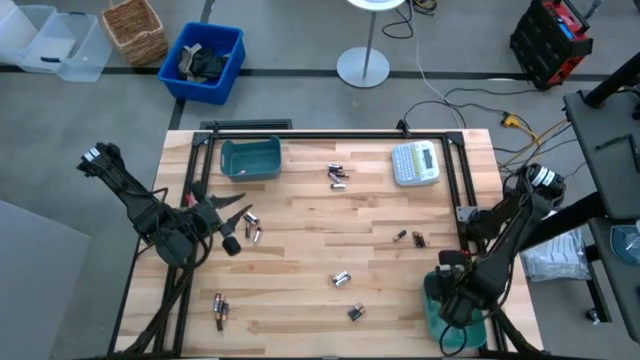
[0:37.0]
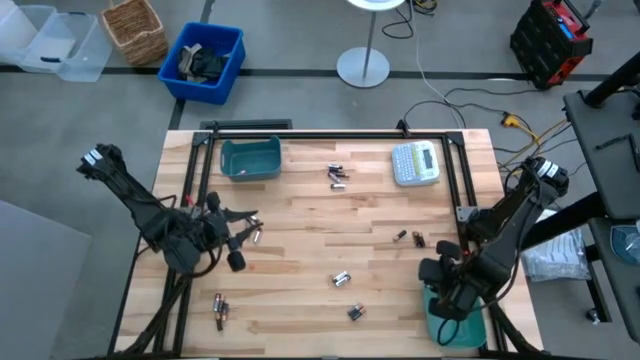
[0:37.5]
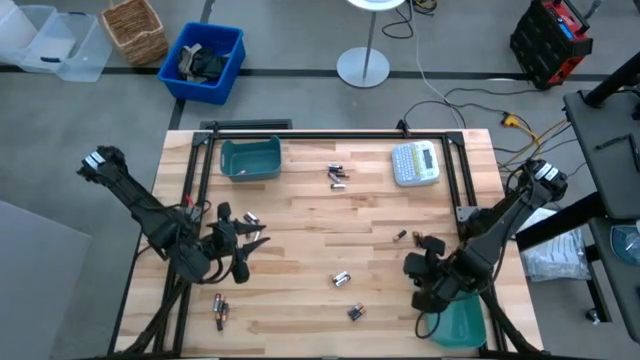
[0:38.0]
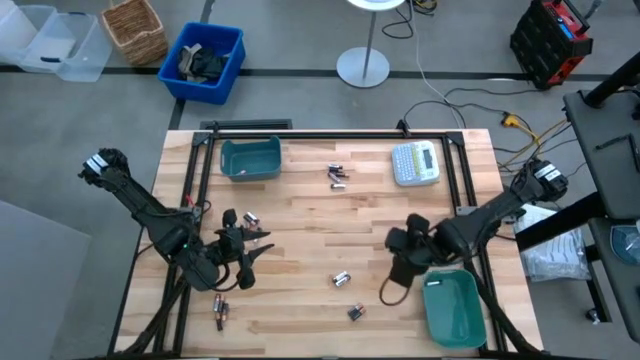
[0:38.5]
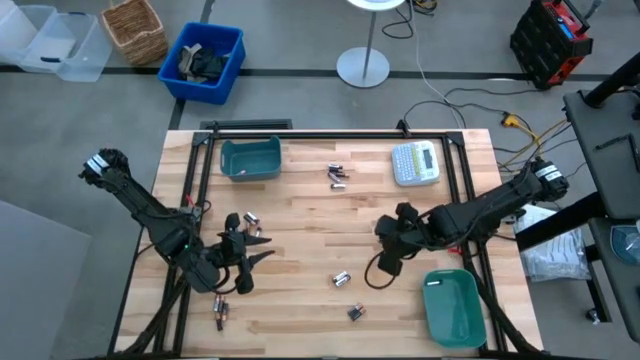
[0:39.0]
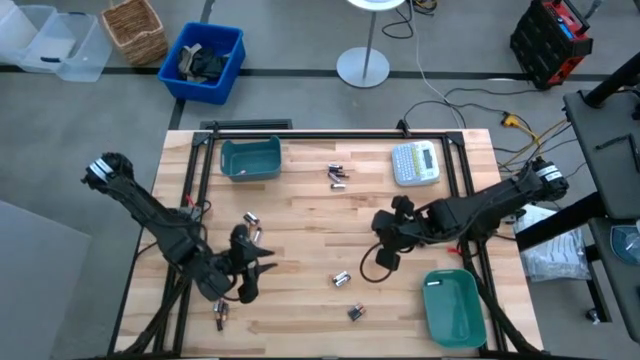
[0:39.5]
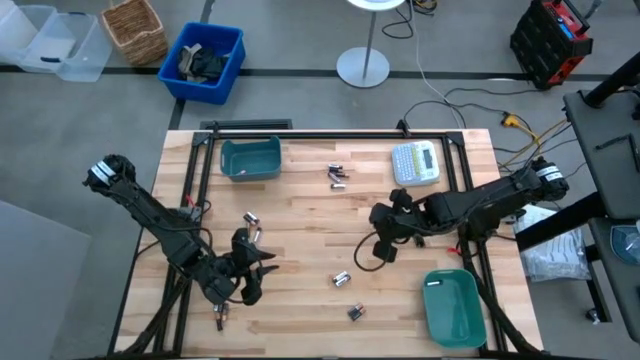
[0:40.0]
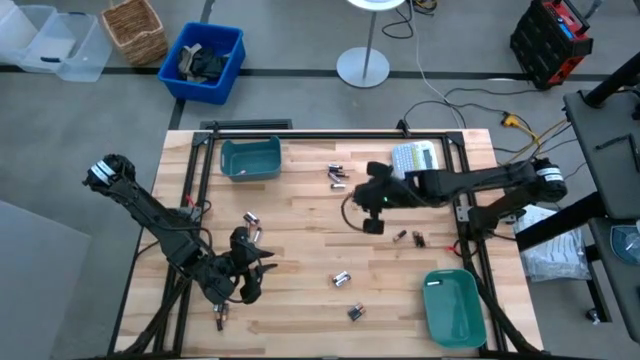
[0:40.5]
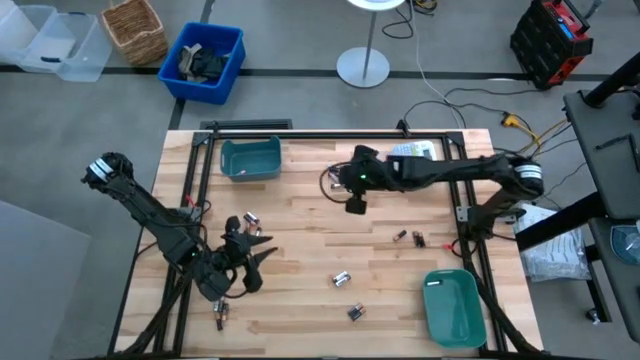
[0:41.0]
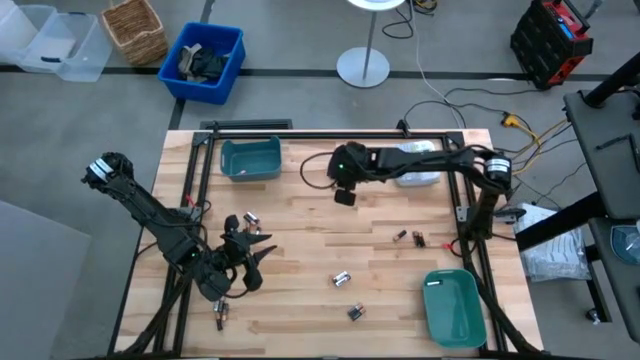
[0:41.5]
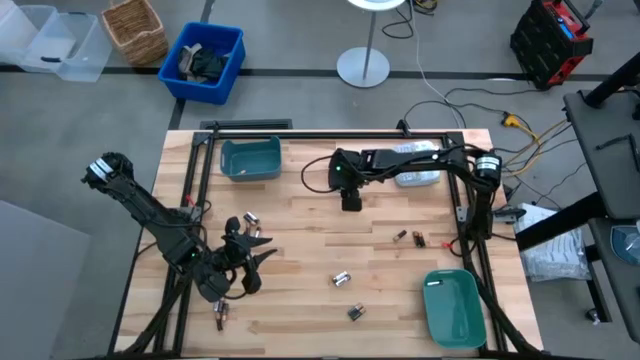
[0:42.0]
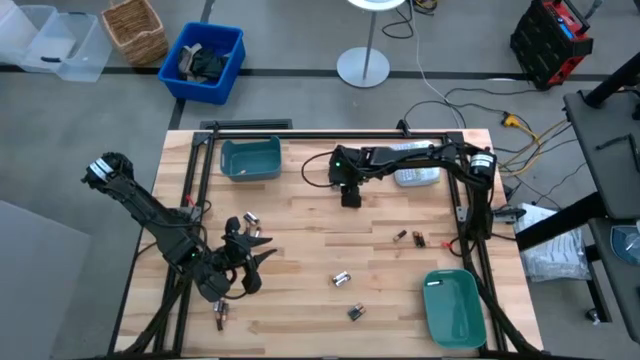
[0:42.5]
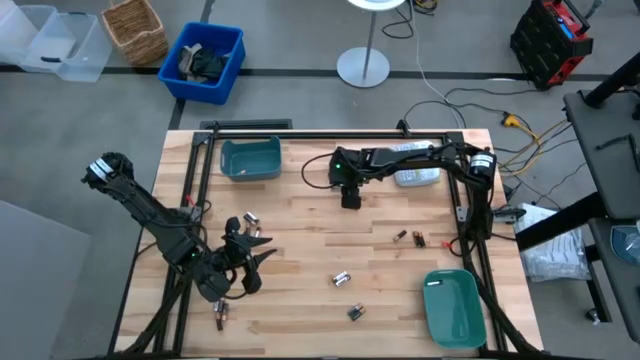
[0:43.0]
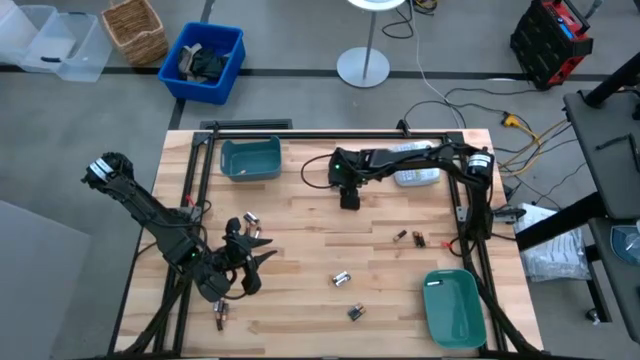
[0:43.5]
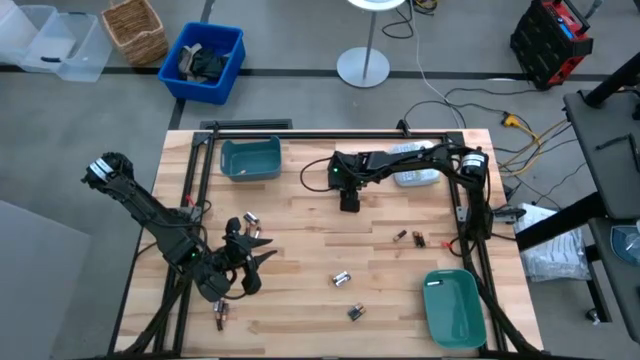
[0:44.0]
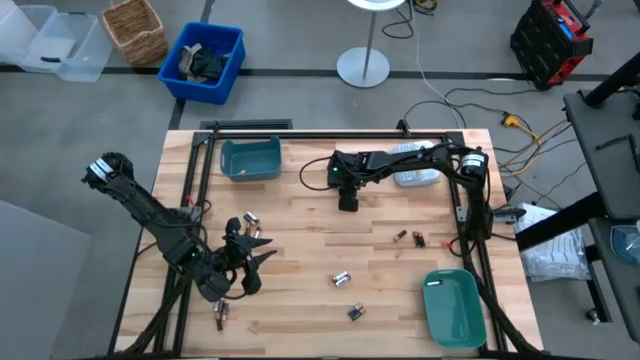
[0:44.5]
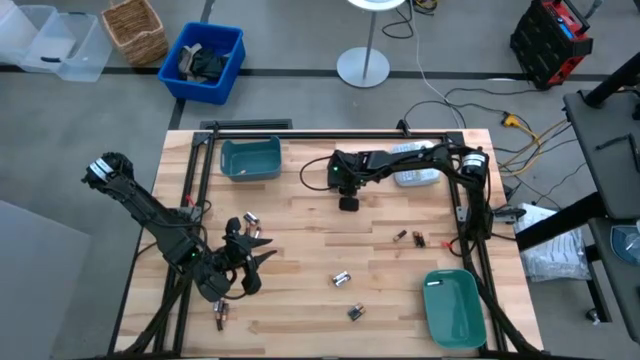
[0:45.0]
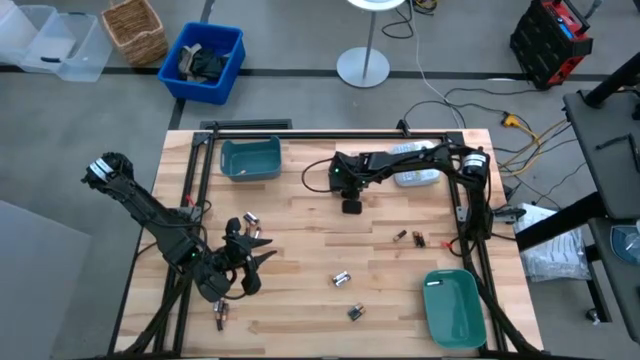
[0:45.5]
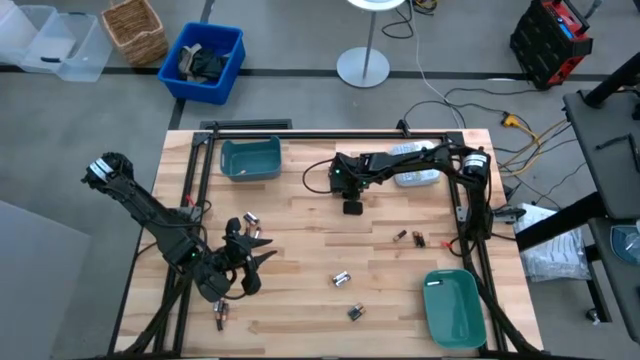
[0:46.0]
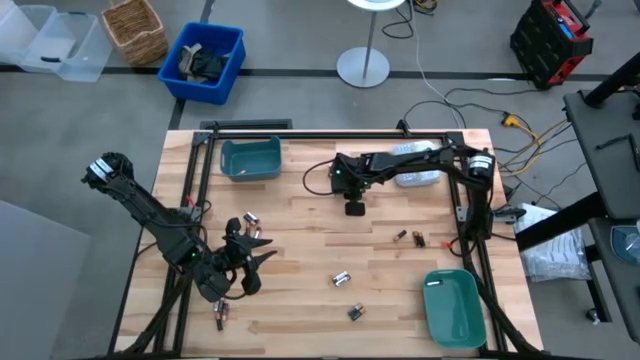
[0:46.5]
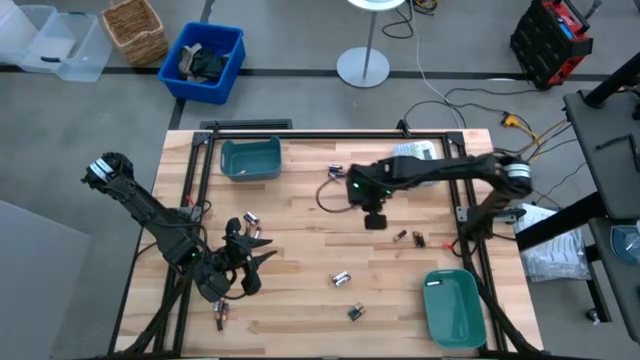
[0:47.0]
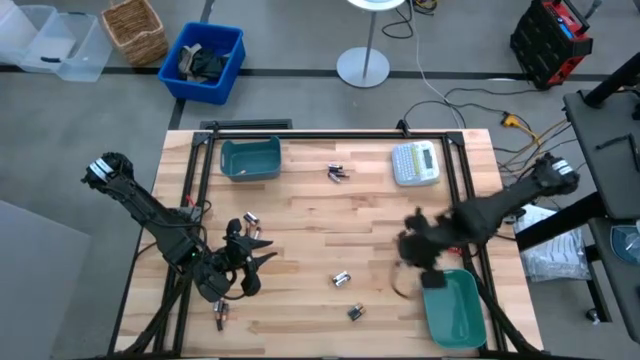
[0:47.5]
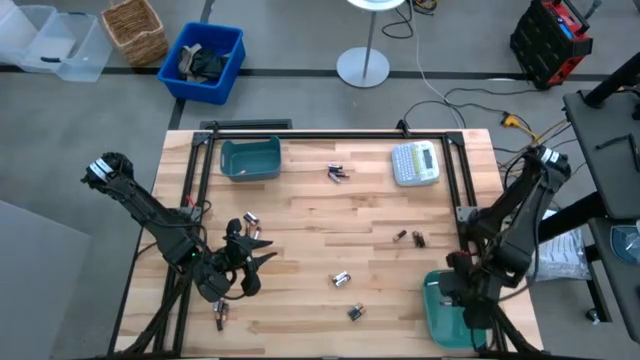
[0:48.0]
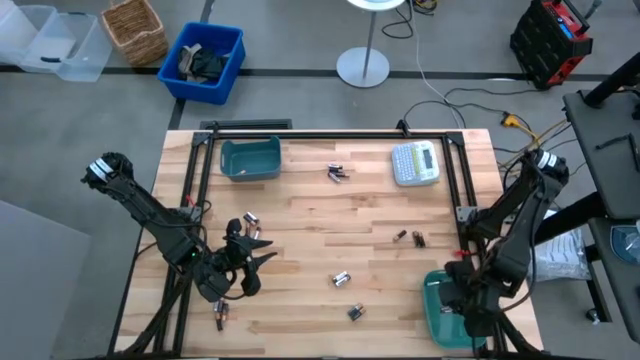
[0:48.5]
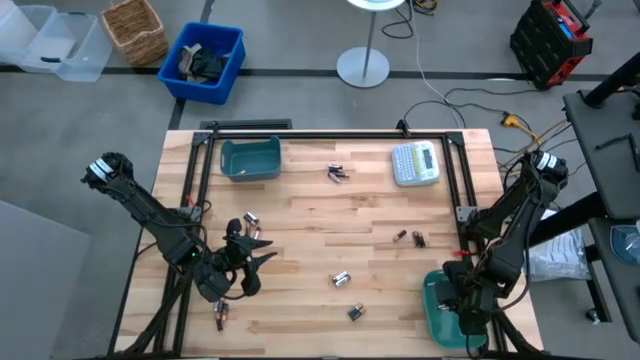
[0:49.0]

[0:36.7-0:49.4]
Task: Sort batteries
Put the silver battery into the green bin

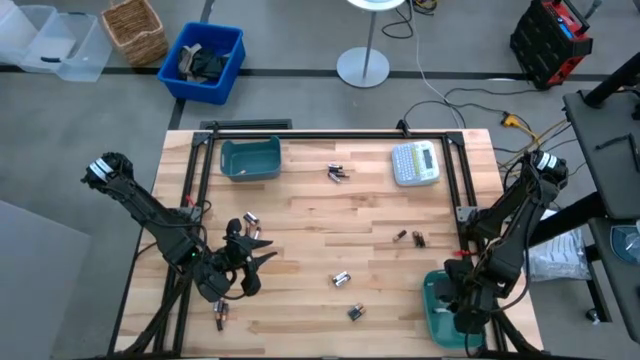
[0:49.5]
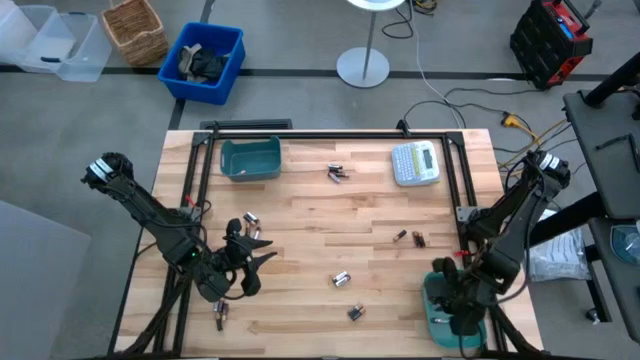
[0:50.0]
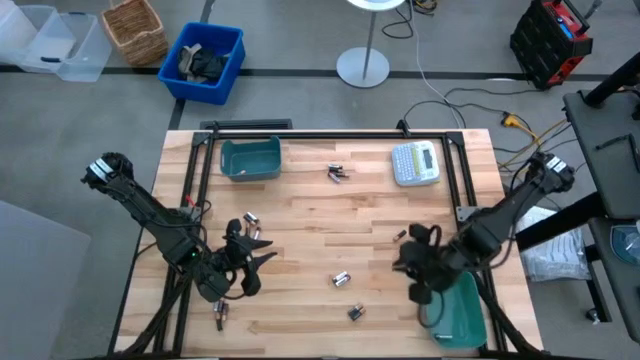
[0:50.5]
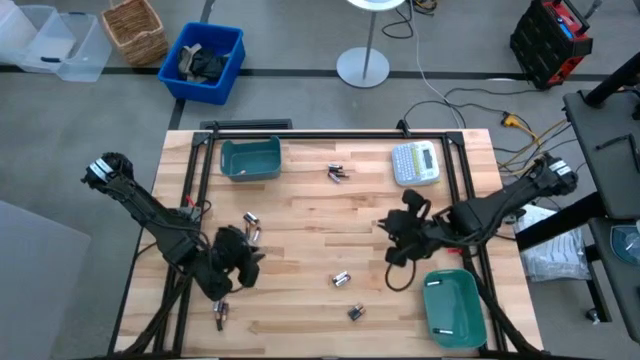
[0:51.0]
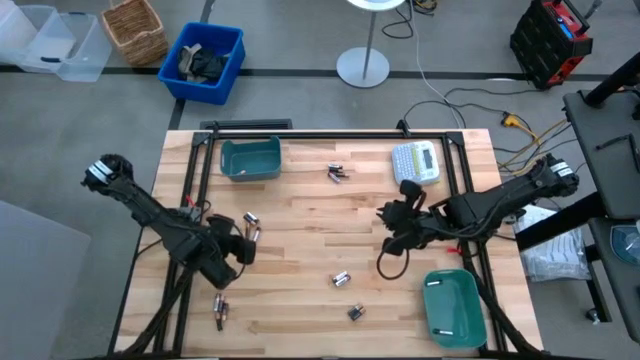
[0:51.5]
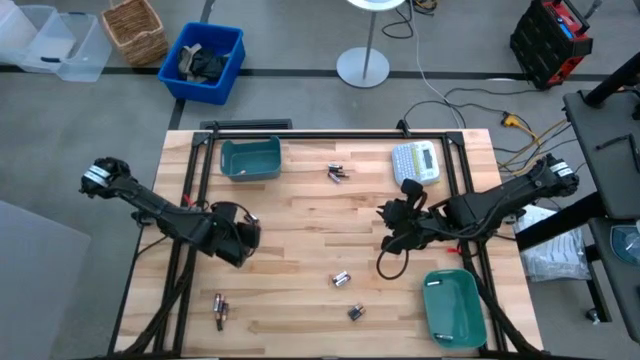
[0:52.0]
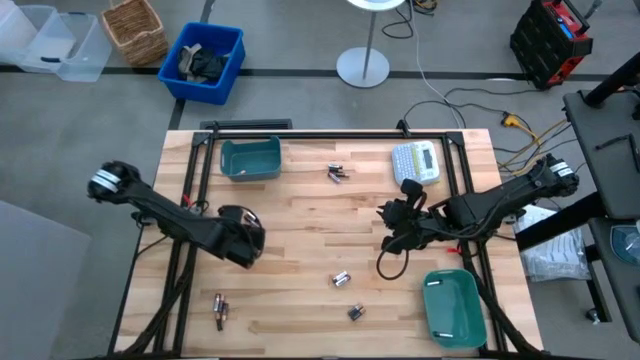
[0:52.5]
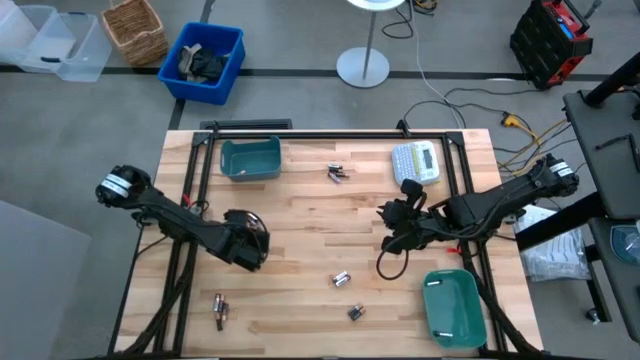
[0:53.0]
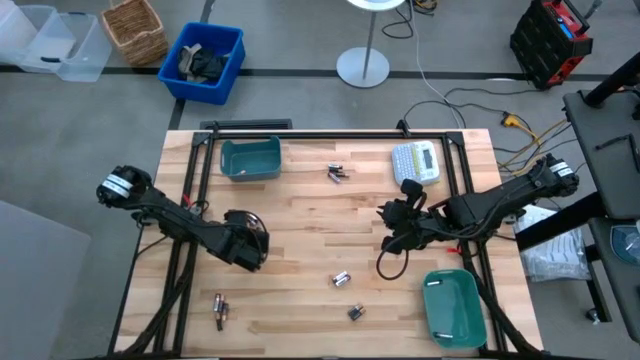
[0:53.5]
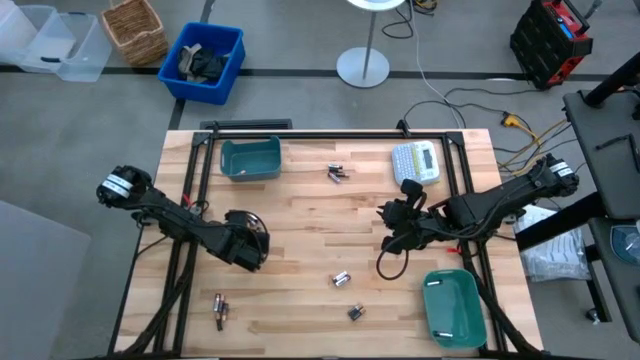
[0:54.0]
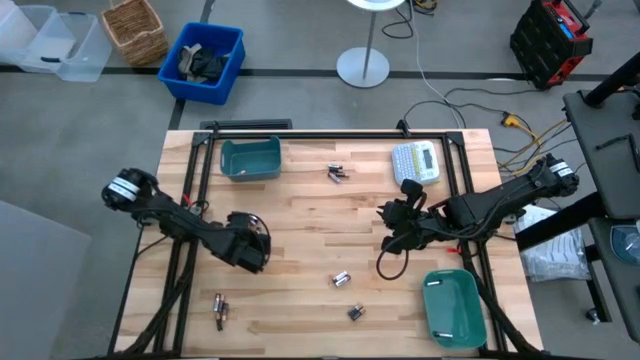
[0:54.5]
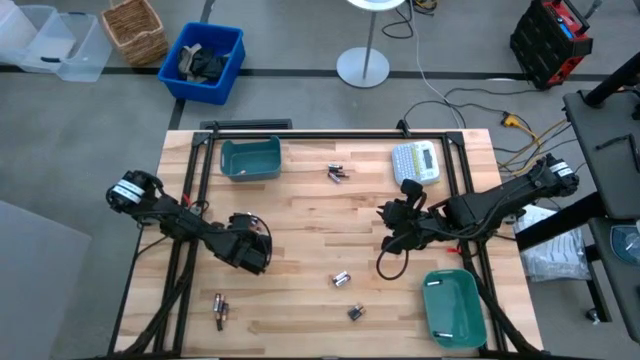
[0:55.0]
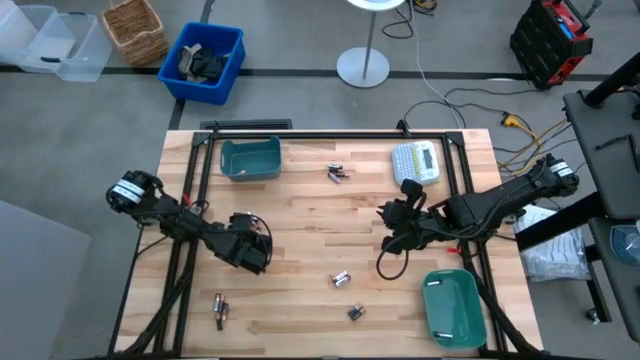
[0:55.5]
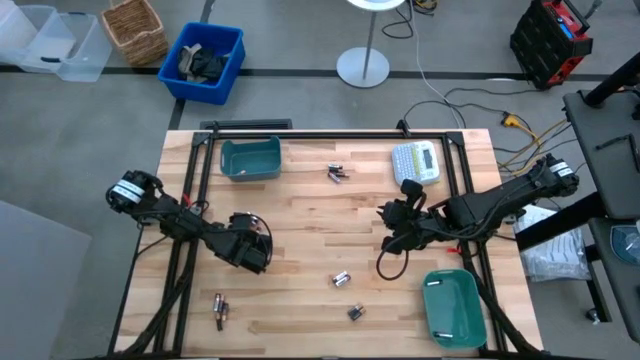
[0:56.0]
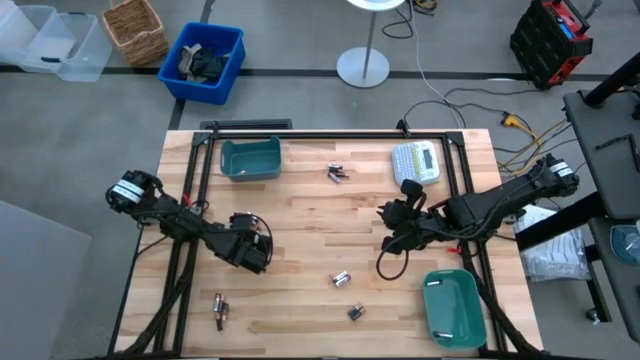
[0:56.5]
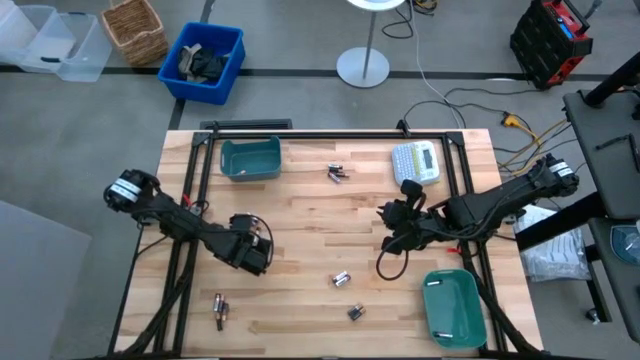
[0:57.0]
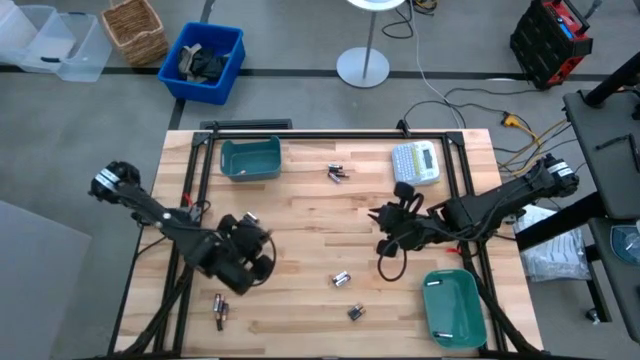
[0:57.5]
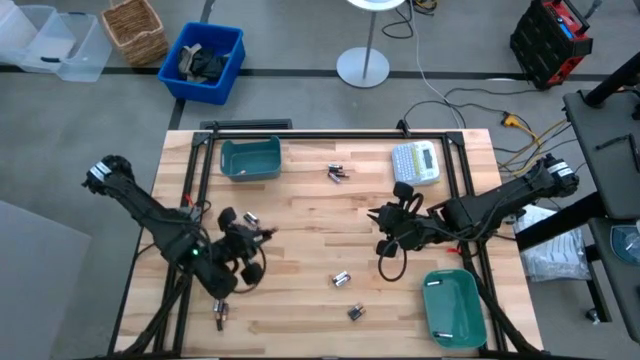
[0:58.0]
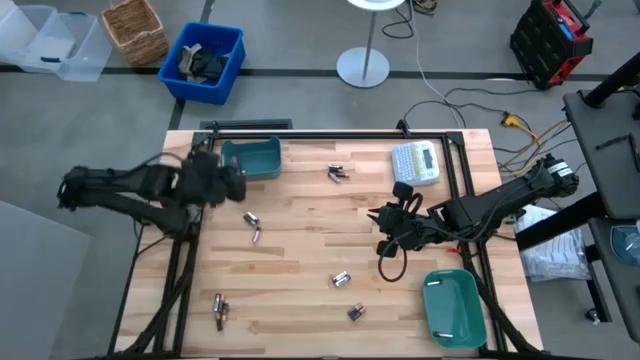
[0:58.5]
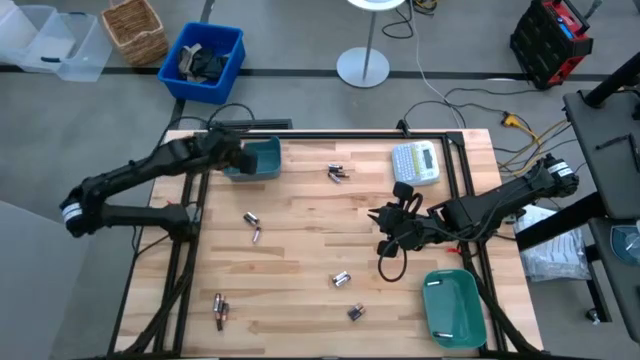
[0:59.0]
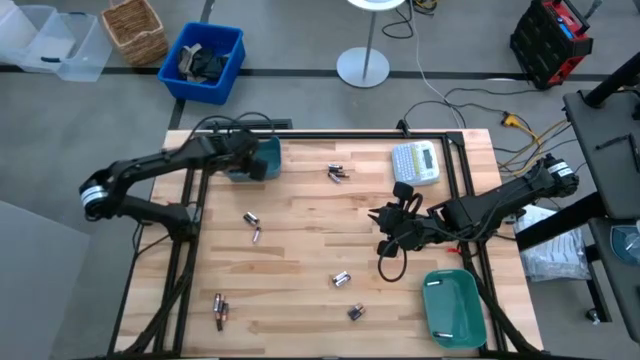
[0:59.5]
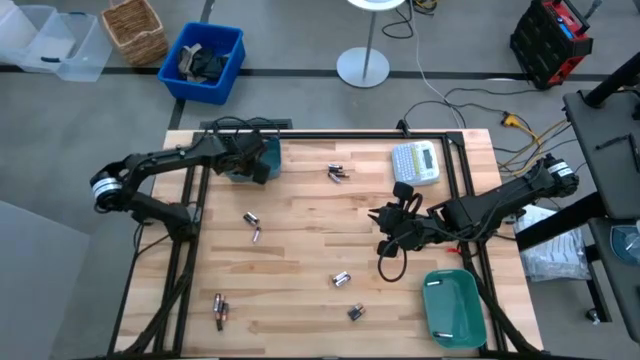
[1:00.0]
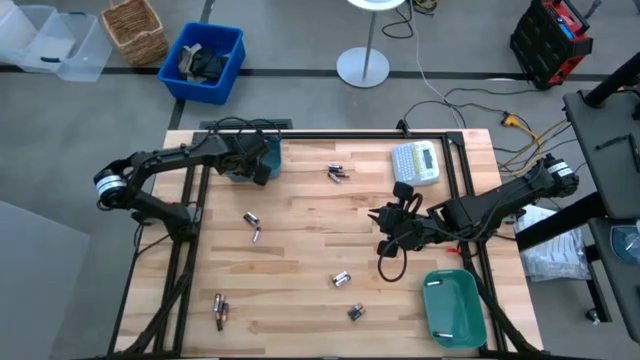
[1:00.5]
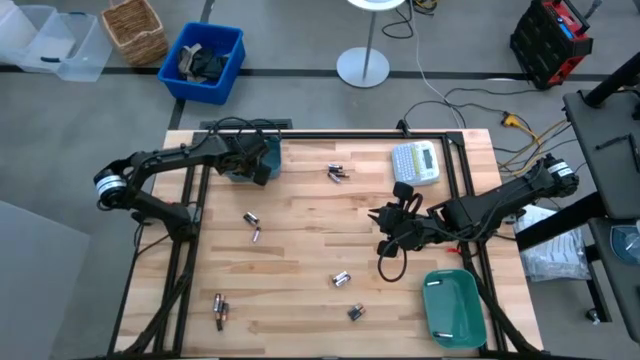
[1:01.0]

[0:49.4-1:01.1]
Put the black battery into the blue bin
